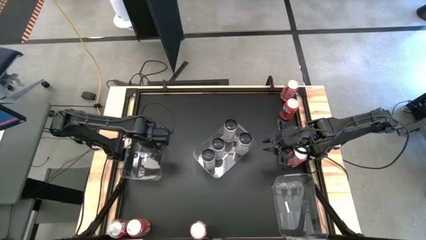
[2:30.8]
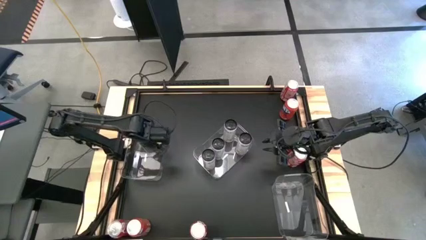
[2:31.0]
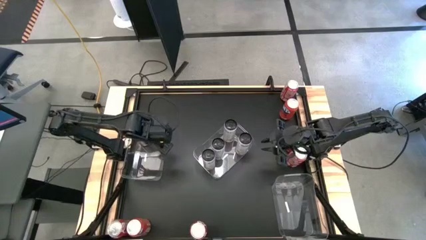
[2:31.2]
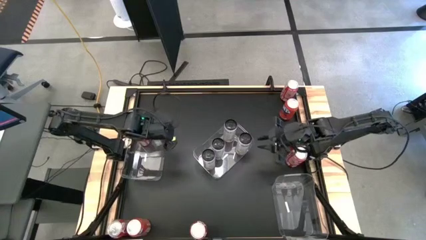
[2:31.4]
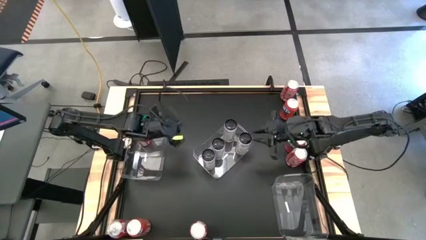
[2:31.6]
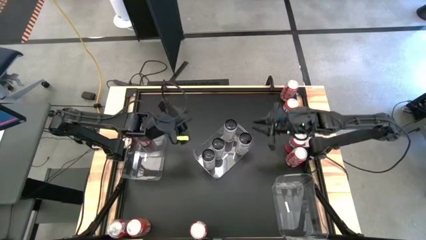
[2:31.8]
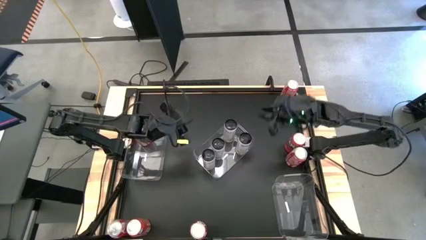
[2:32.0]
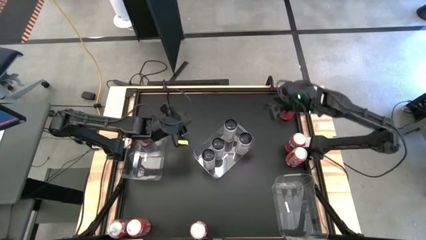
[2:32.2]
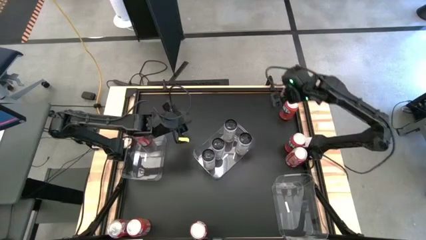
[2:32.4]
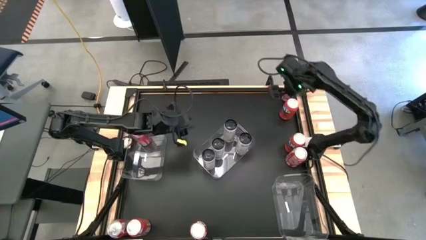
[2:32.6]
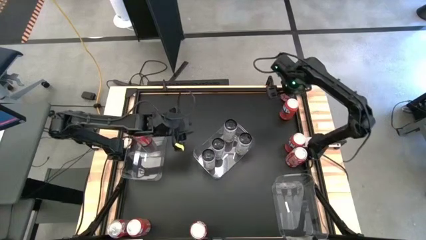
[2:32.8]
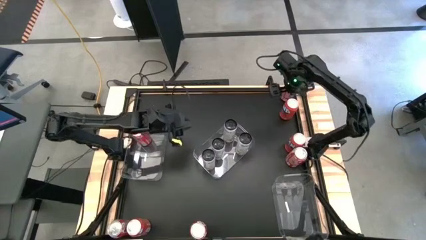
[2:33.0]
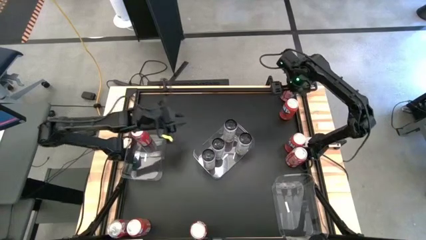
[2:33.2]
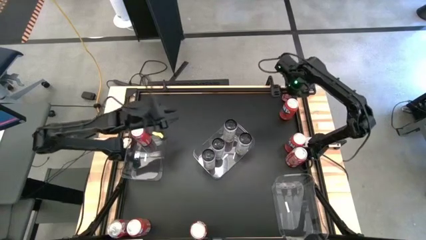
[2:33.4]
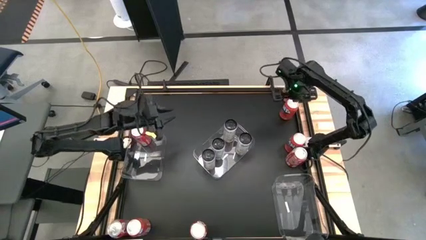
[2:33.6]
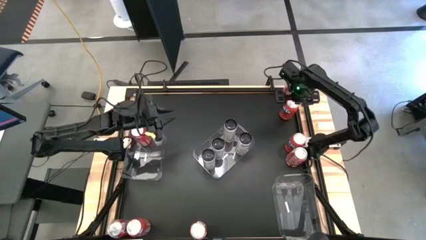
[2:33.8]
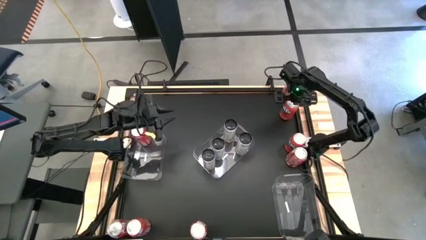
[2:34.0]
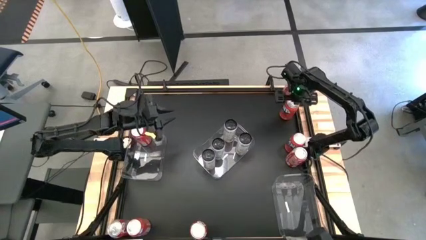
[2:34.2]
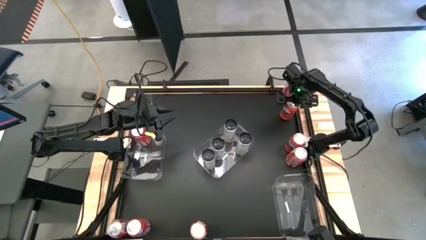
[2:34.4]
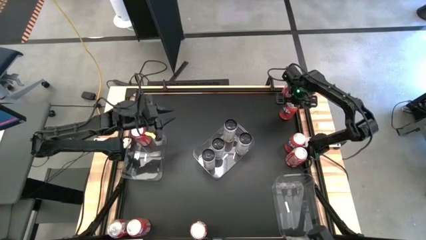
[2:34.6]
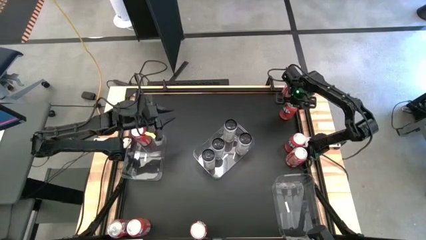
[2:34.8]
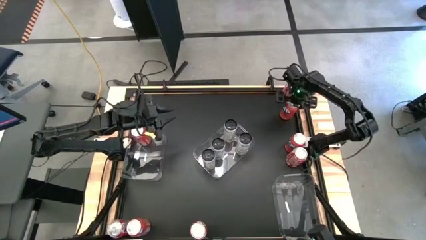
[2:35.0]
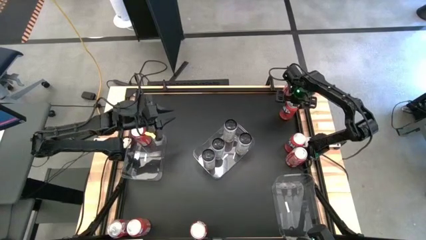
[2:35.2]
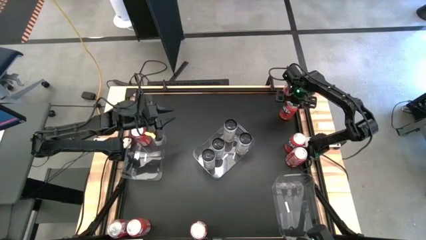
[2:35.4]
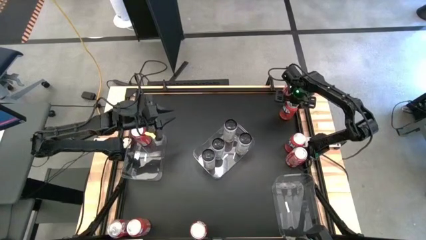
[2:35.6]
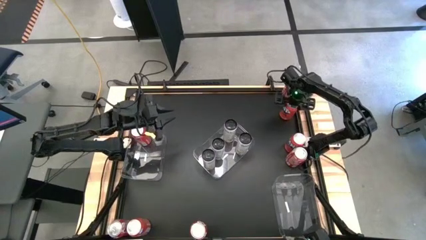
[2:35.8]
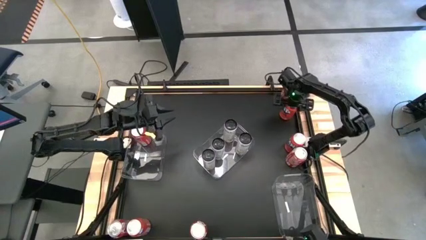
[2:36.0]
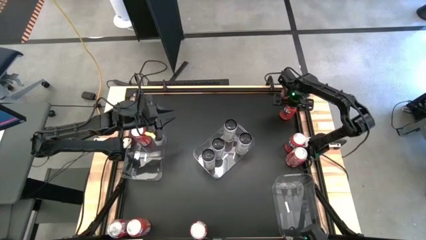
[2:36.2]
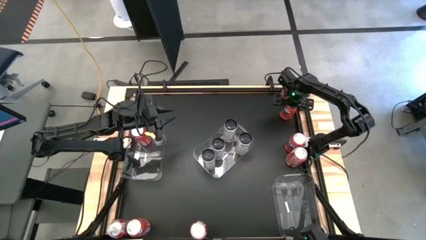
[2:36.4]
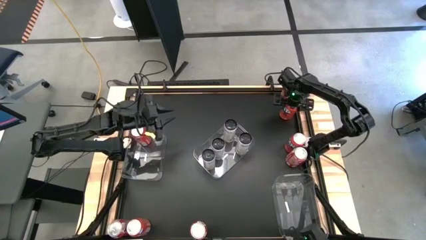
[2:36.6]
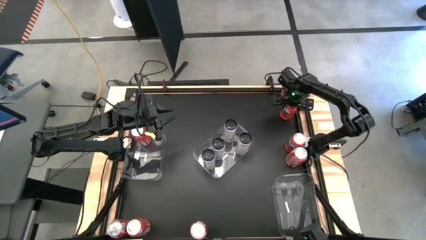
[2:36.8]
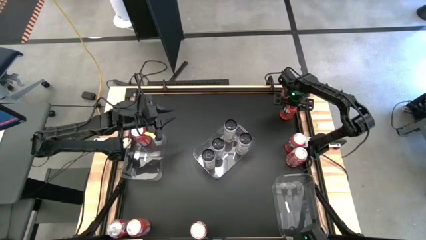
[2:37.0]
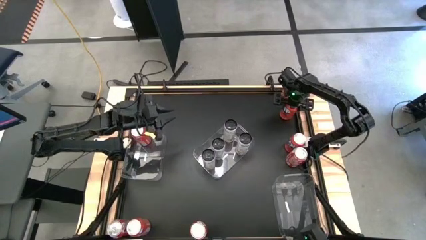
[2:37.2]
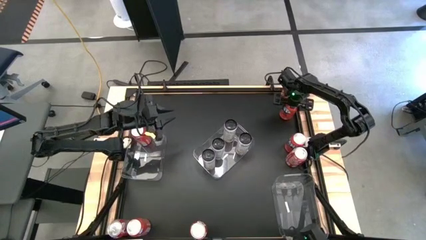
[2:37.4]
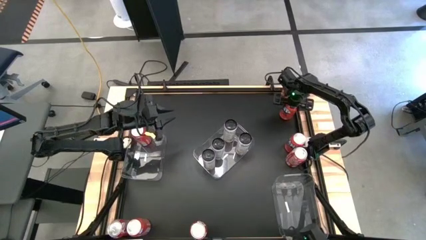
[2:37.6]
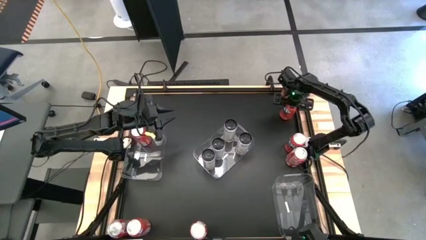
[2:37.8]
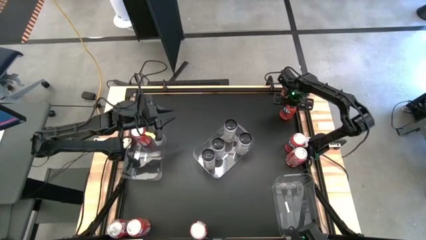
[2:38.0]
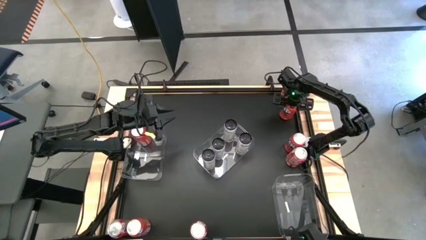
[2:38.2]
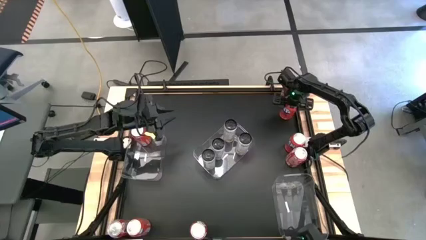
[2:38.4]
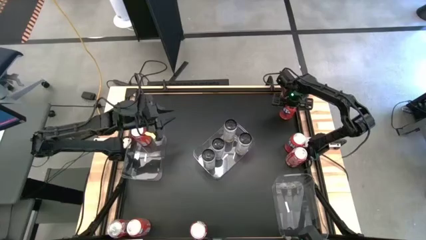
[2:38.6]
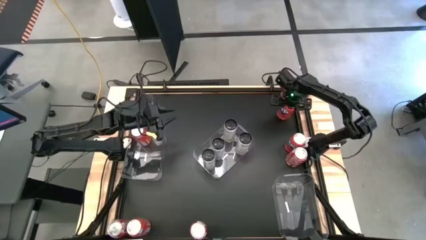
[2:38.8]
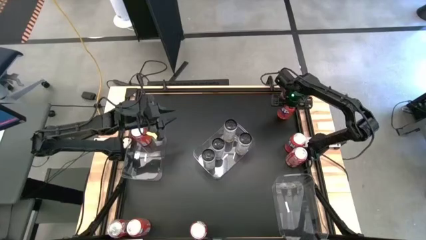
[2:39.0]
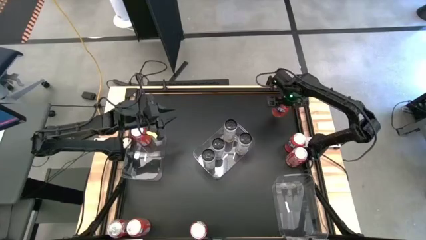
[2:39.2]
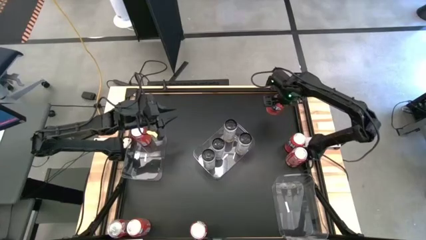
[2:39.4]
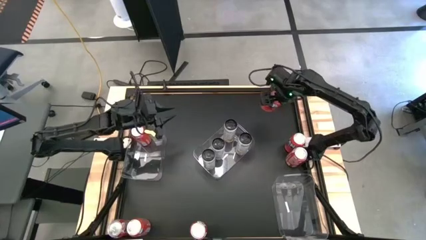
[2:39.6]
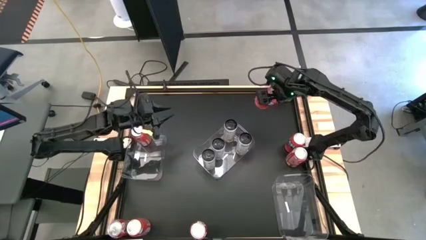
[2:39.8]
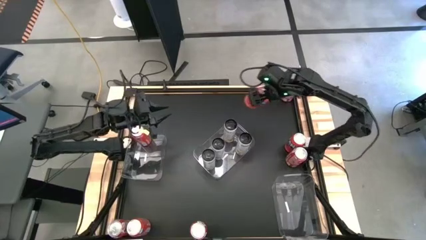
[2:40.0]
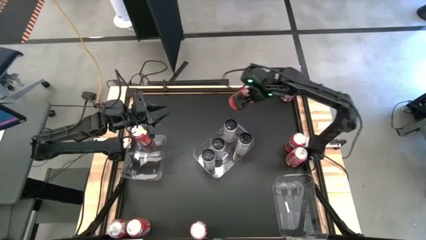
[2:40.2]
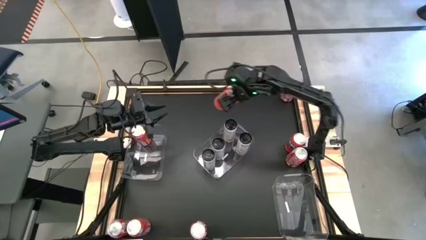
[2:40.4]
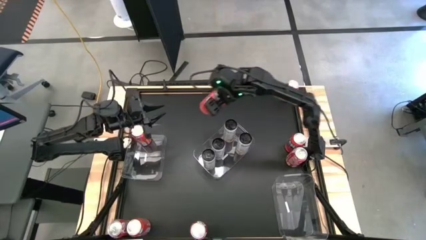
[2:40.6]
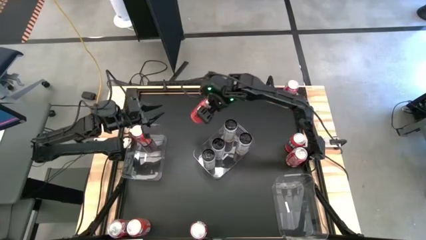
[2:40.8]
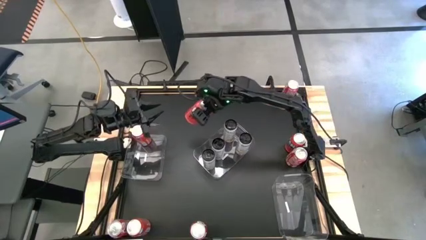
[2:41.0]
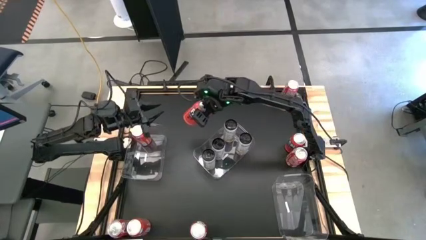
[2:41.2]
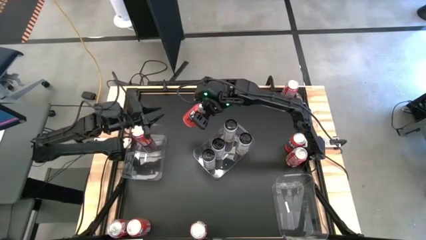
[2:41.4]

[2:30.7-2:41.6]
Task: Sort soda cans
Put the orange soda can into the left transparent bin

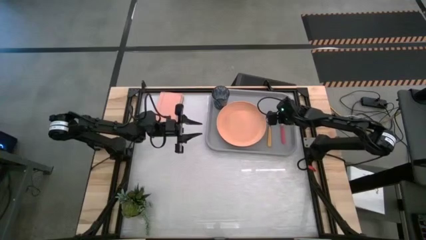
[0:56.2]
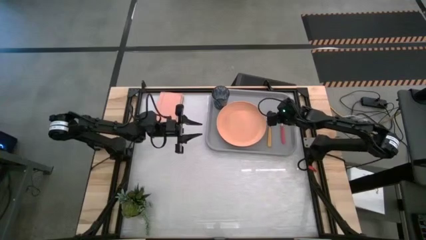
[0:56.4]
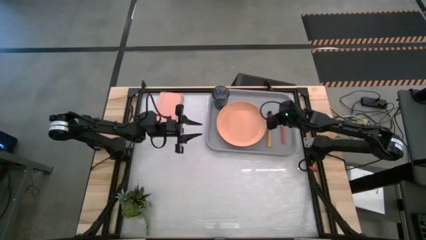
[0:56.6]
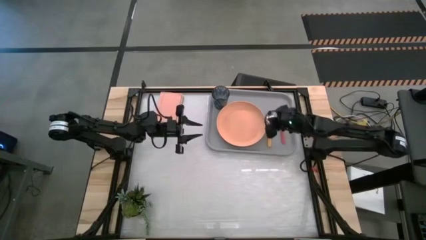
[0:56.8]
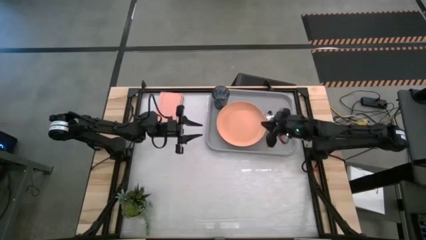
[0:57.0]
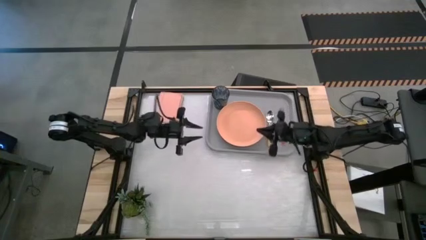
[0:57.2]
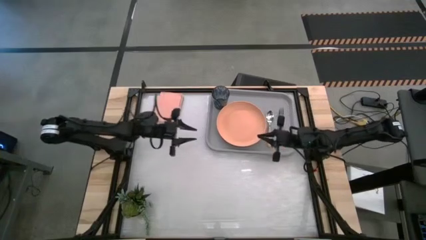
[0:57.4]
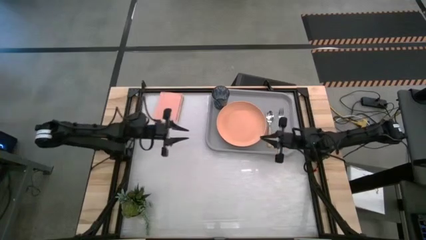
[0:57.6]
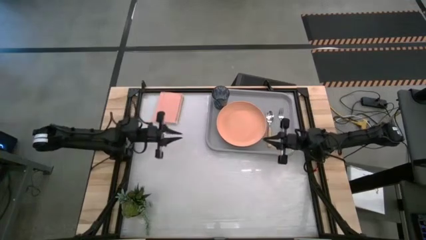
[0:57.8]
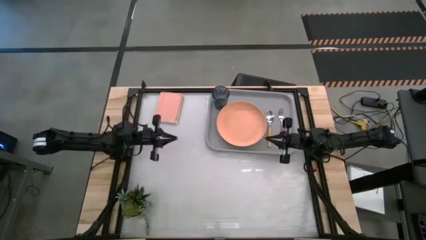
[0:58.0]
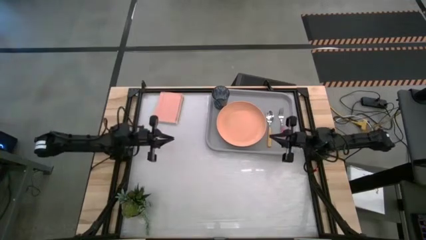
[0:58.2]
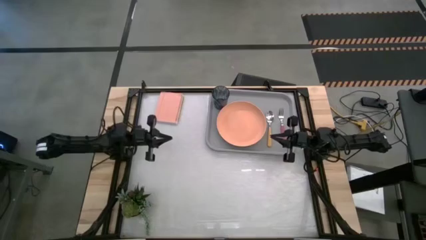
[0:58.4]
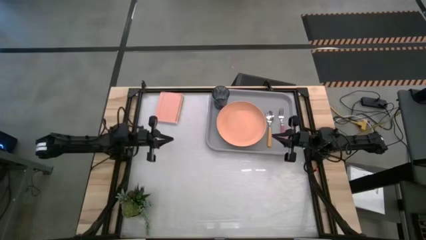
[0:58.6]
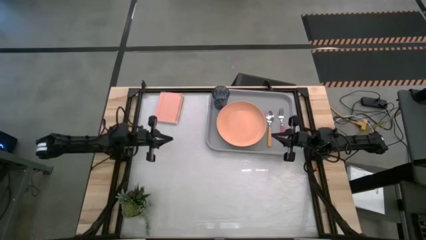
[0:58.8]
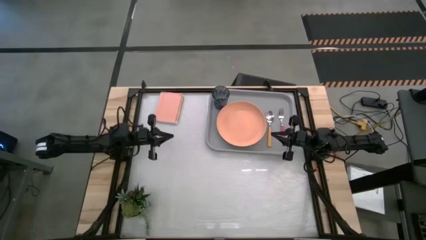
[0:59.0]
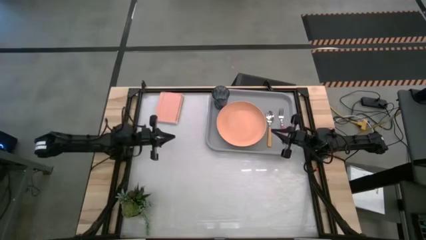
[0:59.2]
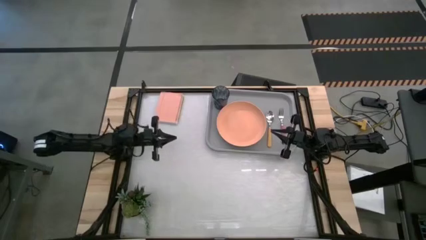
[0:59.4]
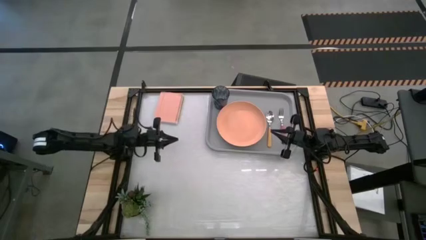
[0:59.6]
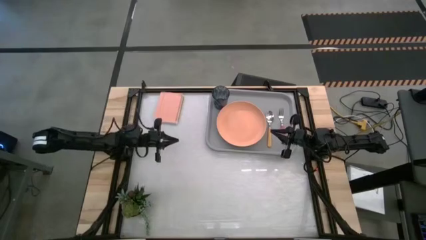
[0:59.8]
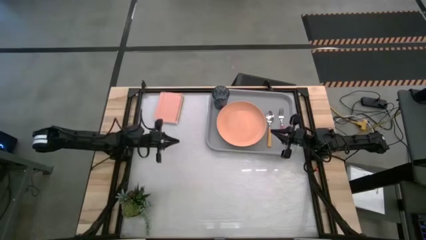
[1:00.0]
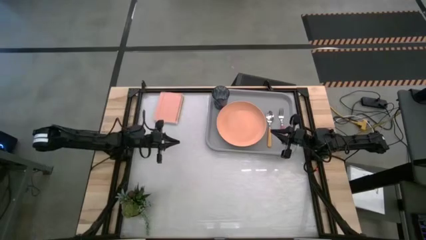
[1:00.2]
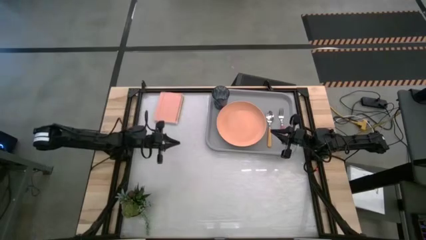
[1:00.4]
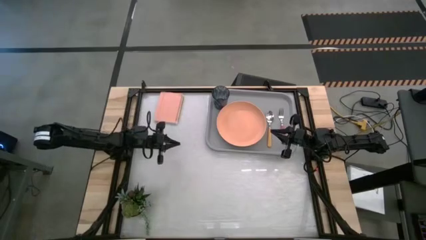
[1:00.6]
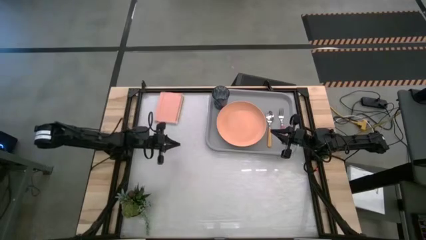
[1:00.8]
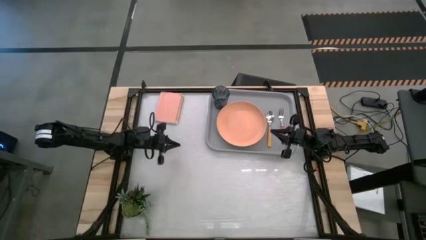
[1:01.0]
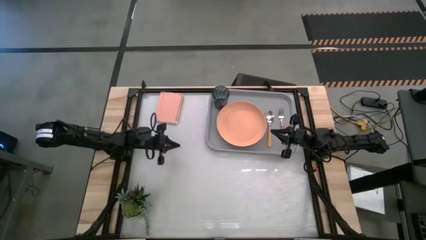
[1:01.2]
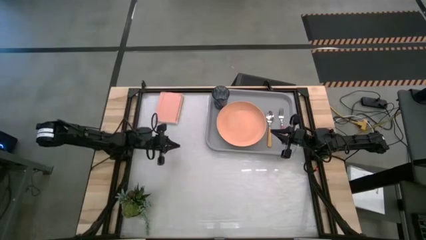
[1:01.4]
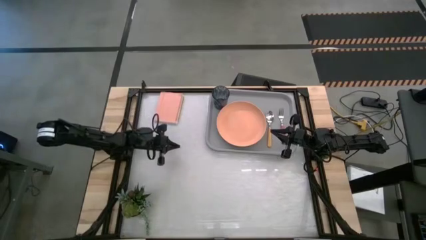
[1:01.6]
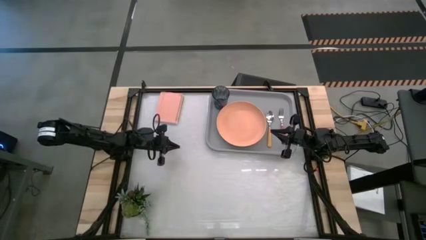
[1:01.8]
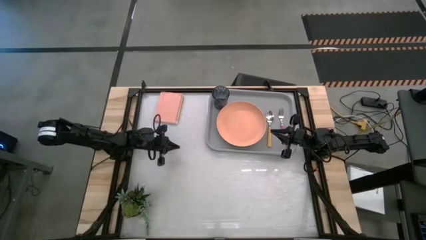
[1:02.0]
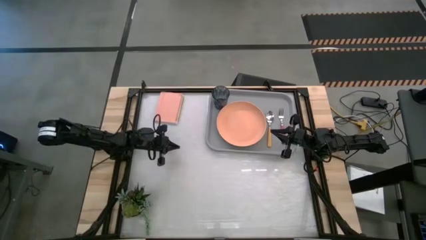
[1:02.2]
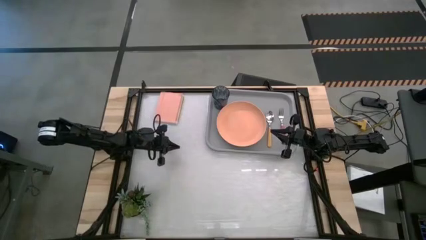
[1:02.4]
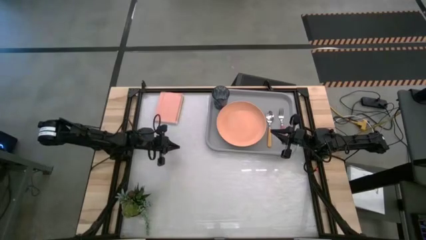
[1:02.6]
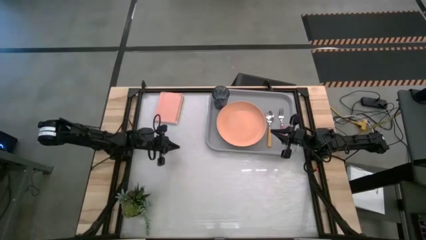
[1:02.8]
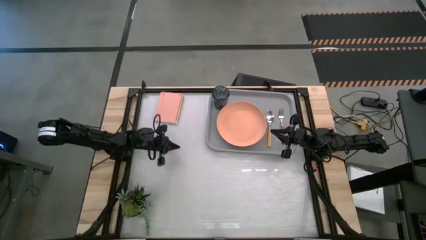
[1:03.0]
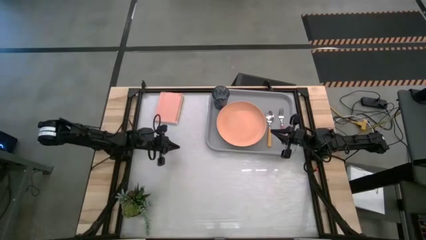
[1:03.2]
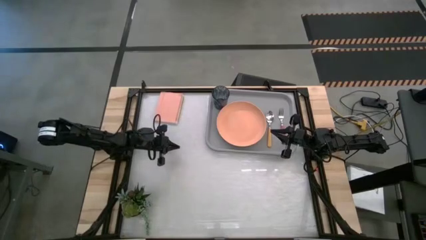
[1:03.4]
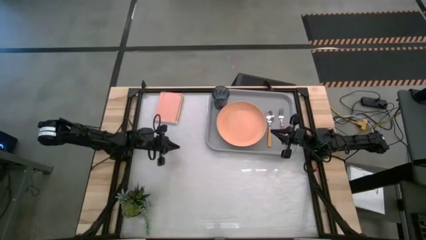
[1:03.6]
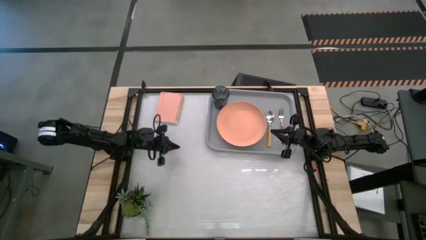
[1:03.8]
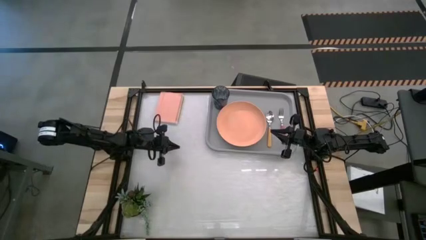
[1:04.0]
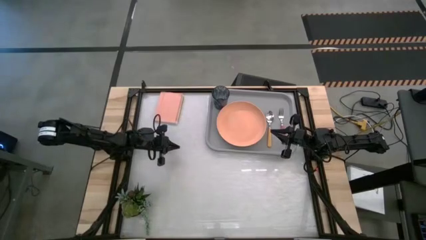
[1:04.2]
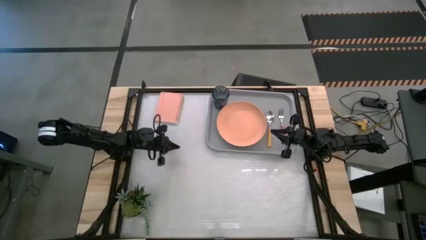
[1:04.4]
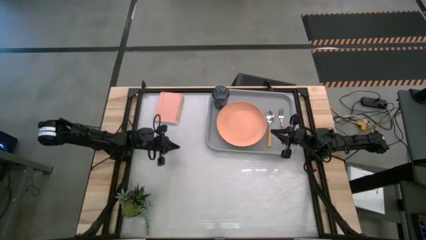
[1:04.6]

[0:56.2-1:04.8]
Task: Pick and place plate/cup/fork/spoon on tray
Return to Home Position
